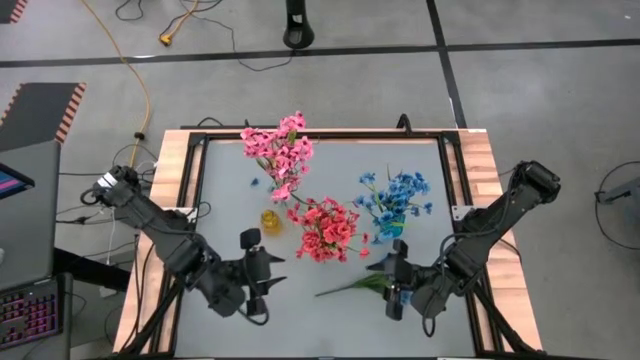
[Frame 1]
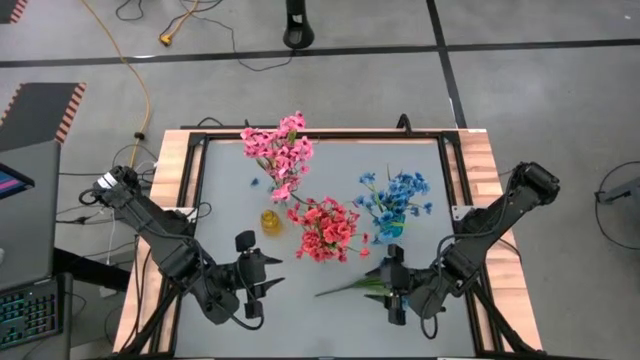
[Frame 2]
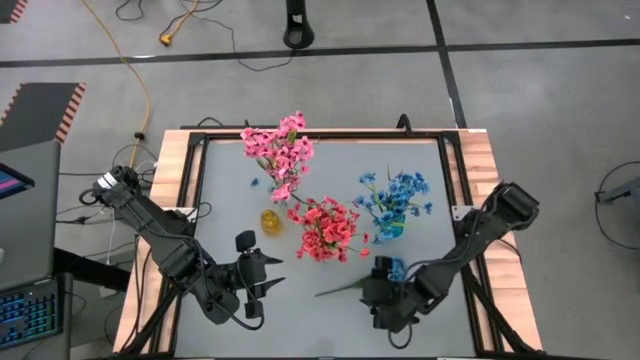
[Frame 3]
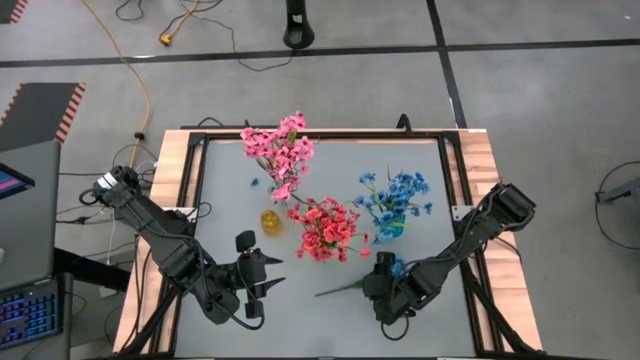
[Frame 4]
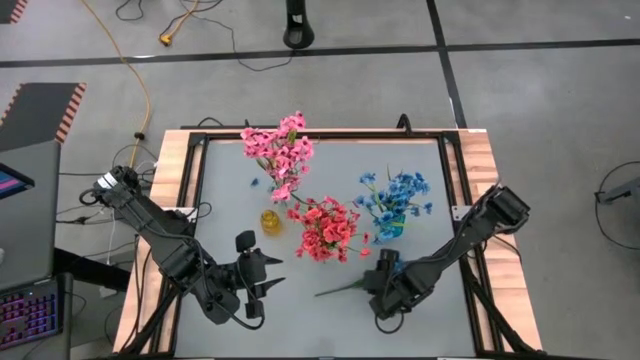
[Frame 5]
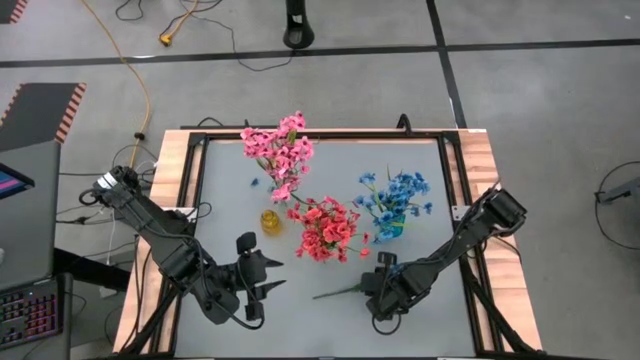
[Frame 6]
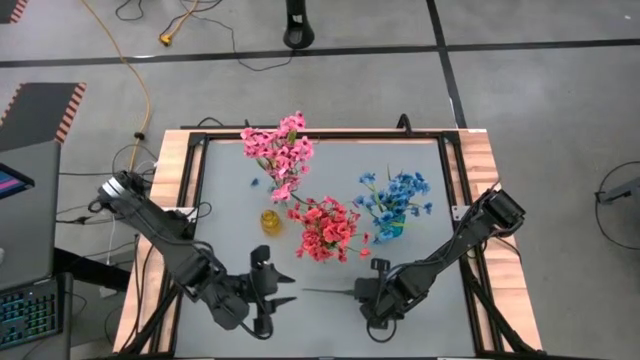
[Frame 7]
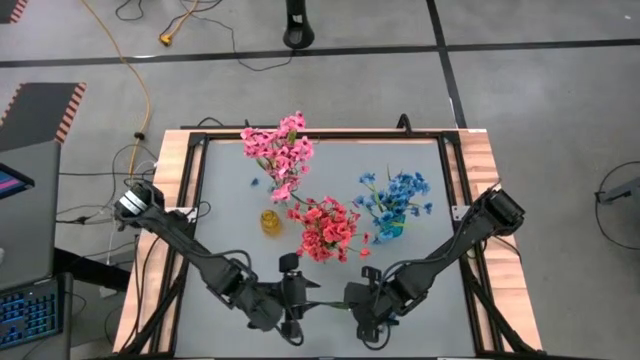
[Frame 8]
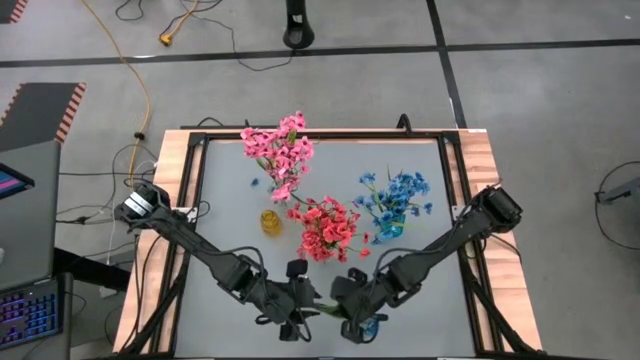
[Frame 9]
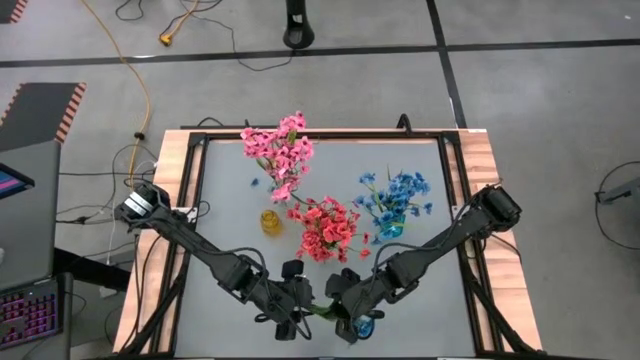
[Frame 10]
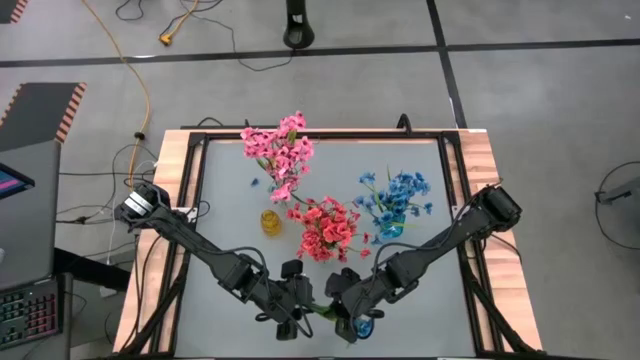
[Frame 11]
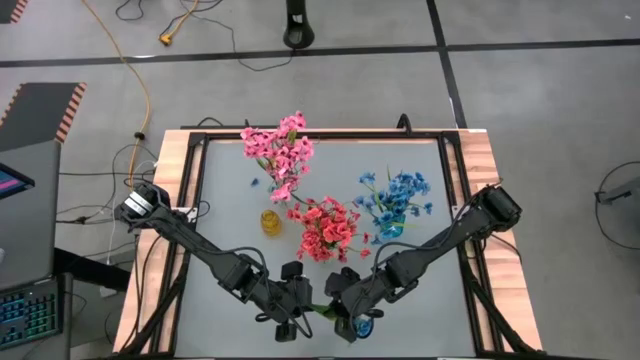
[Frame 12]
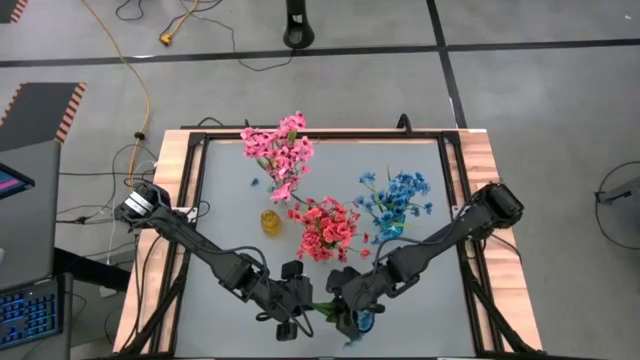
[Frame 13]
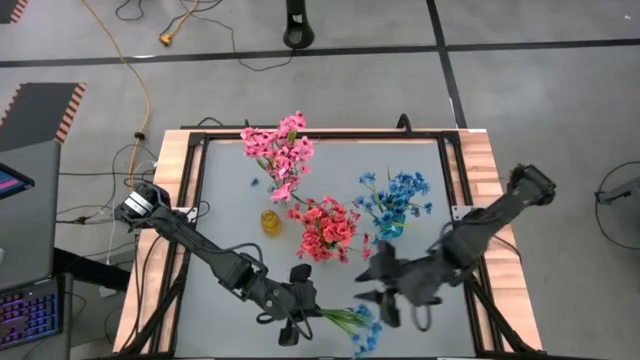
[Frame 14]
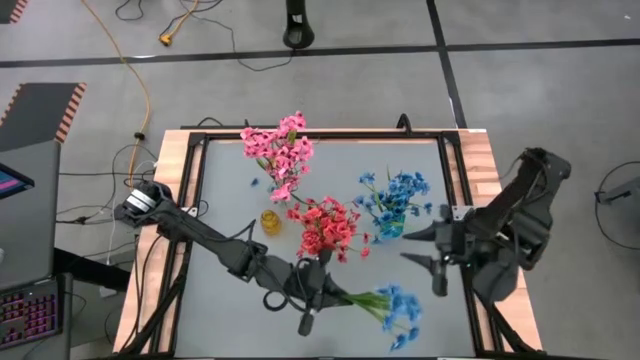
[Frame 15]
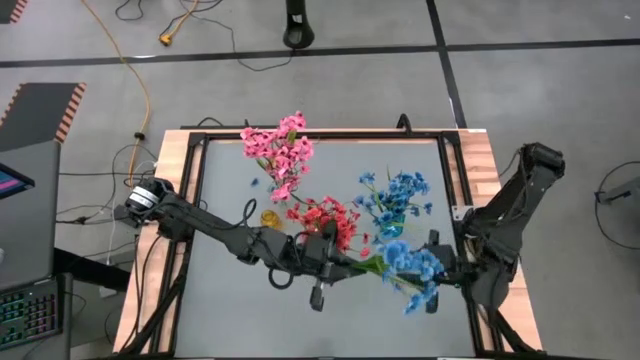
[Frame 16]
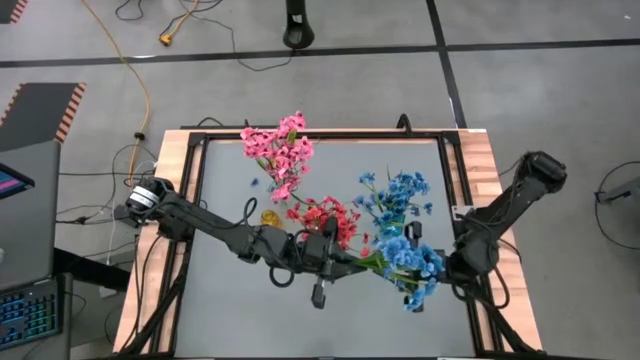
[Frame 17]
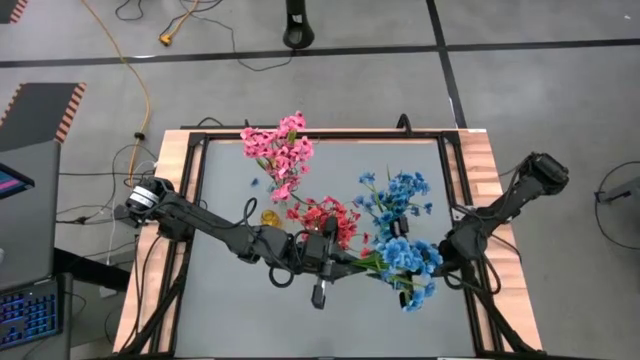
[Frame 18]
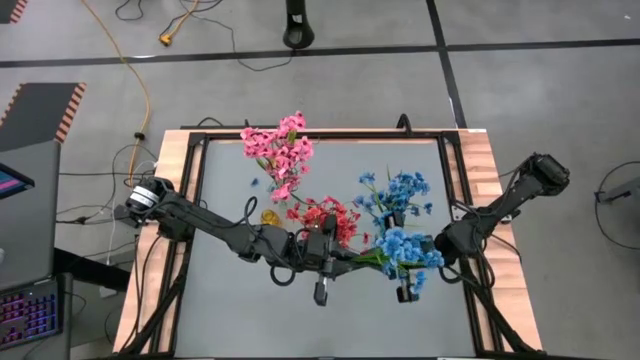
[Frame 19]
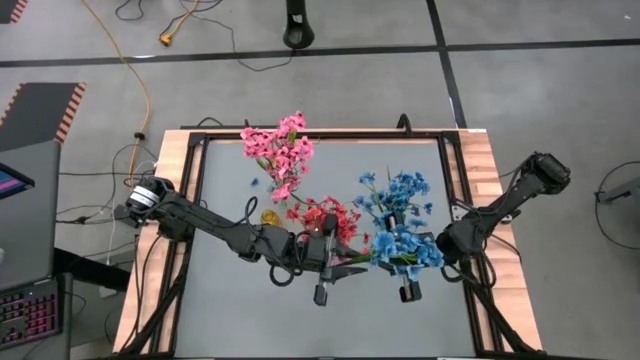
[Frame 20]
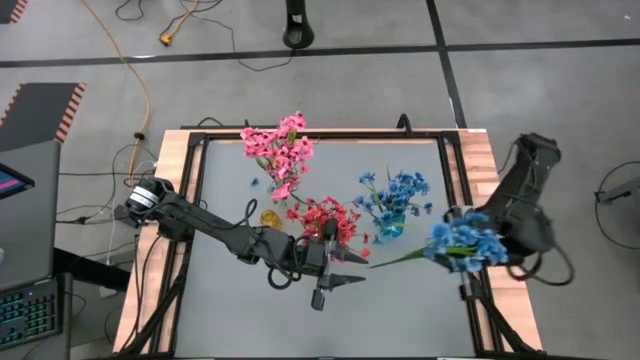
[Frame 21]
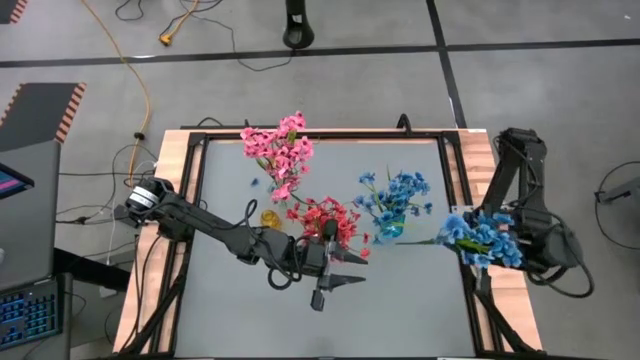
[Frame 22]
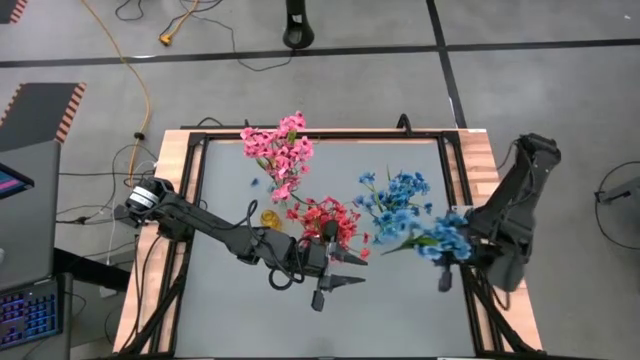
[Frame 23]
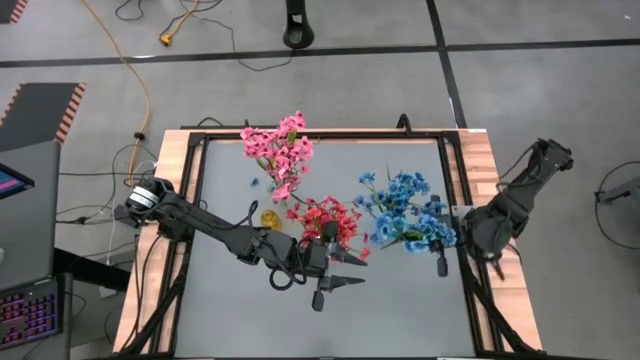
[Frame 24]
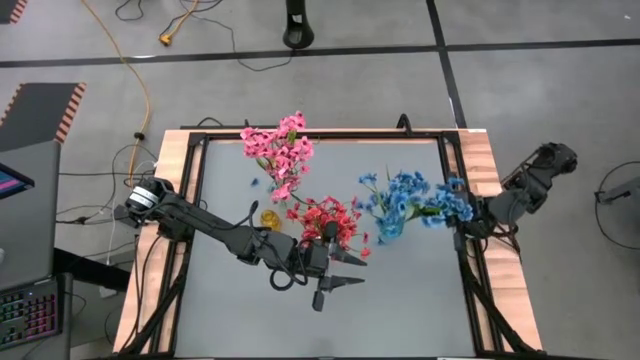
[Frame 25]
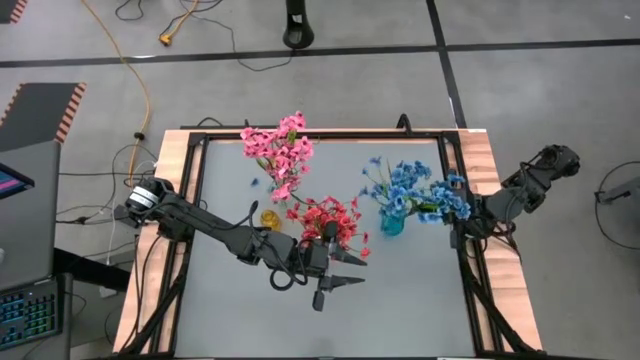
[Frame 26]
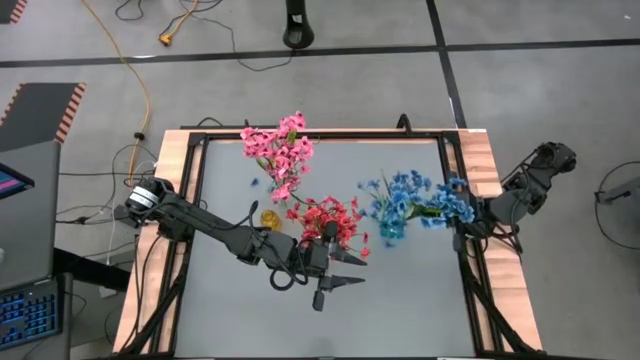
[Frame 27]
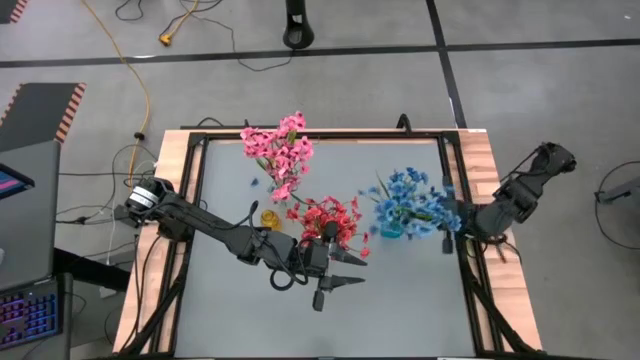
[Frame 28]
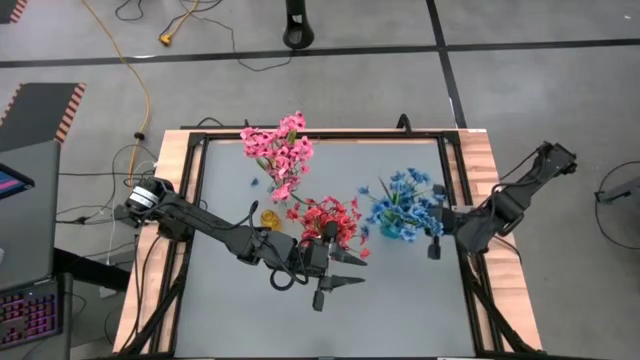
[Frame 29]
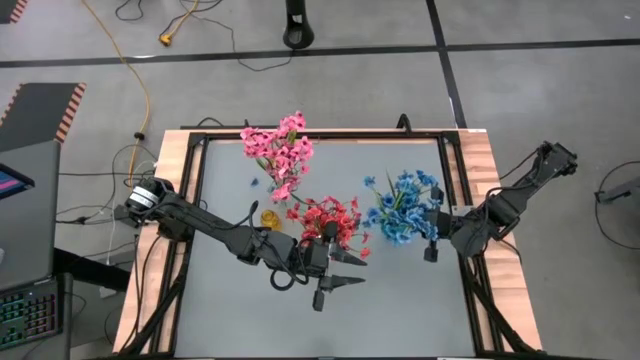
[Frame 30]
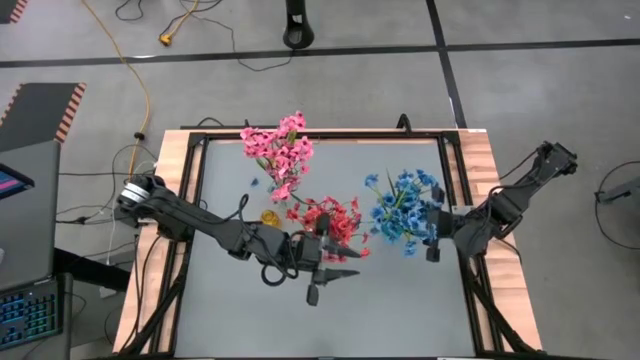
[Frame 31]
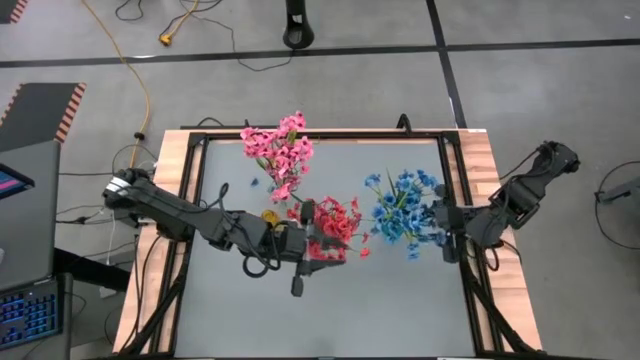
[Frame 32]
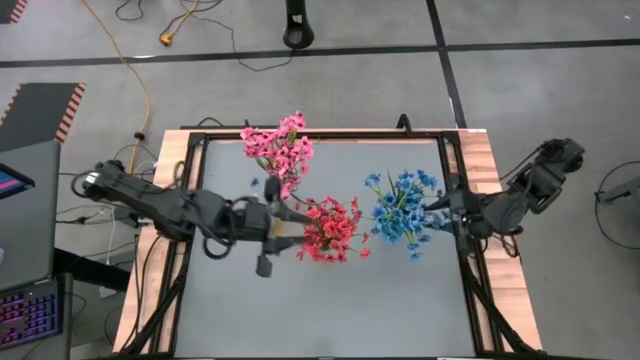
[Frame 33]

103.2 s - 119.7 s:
Task: Sort flowers into vase by color
Put the blue flowers into the blue vase

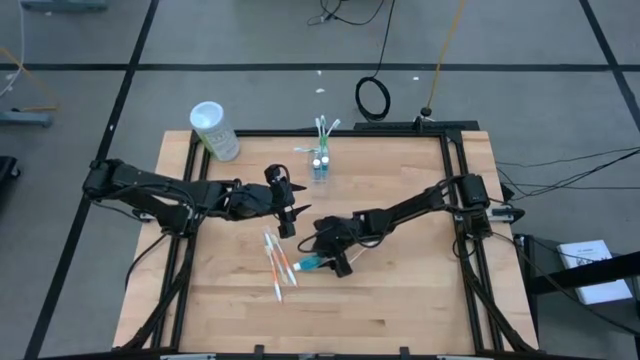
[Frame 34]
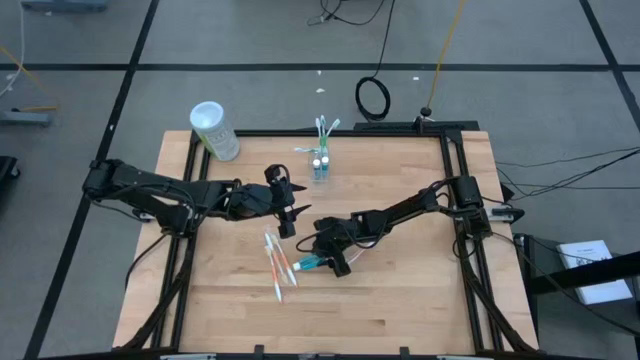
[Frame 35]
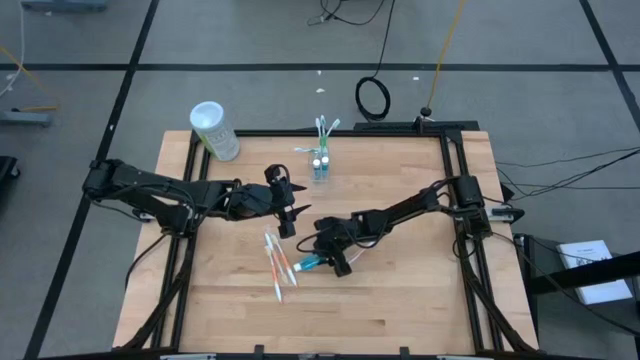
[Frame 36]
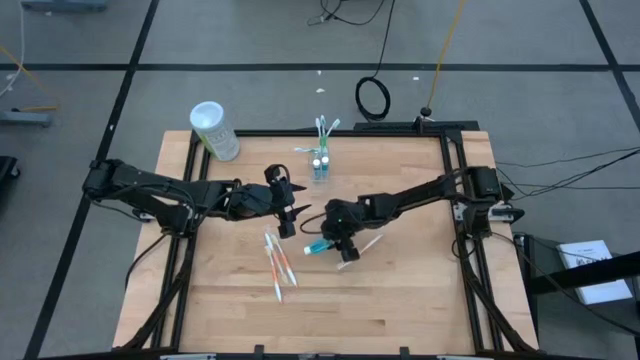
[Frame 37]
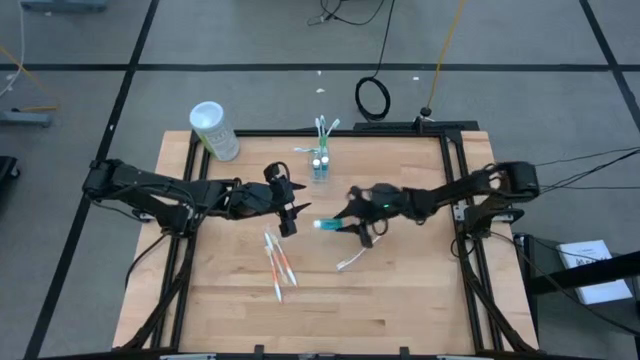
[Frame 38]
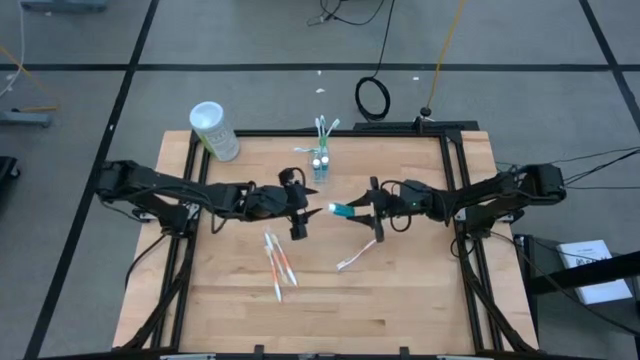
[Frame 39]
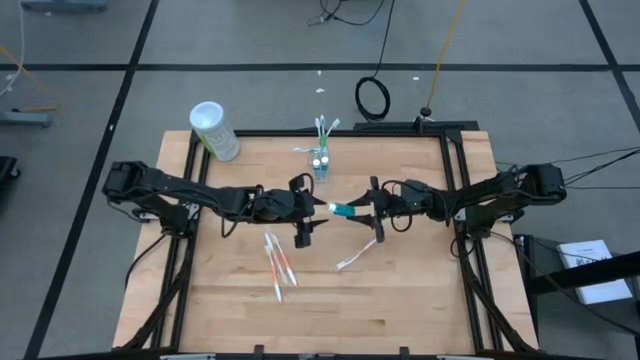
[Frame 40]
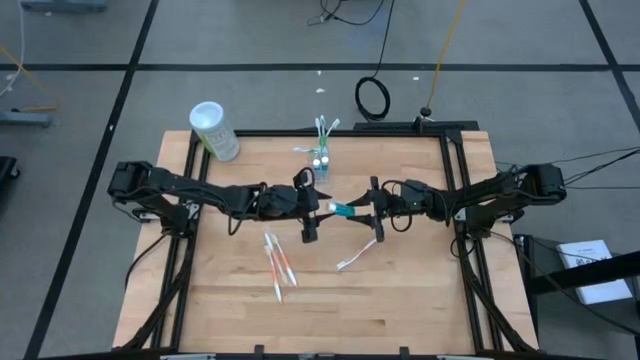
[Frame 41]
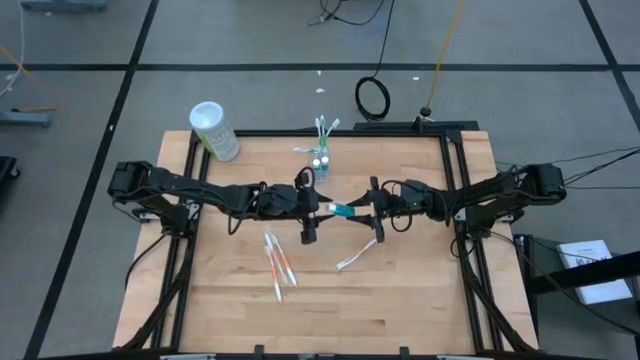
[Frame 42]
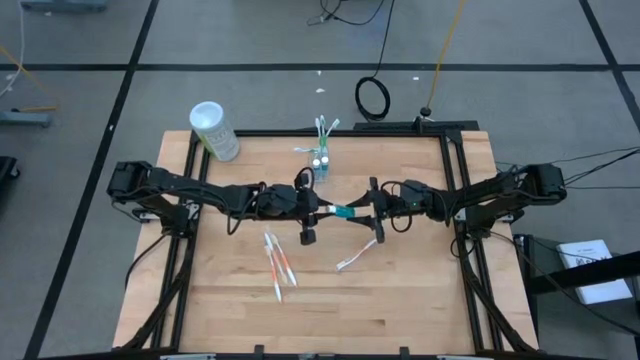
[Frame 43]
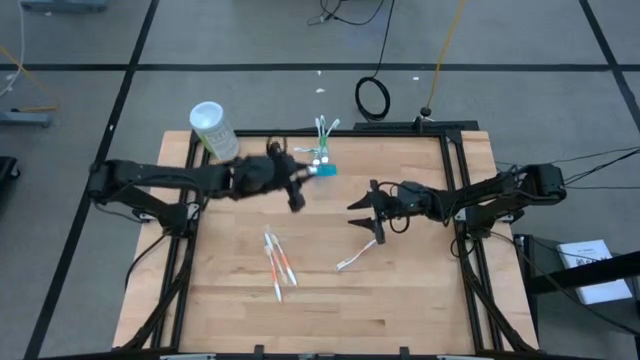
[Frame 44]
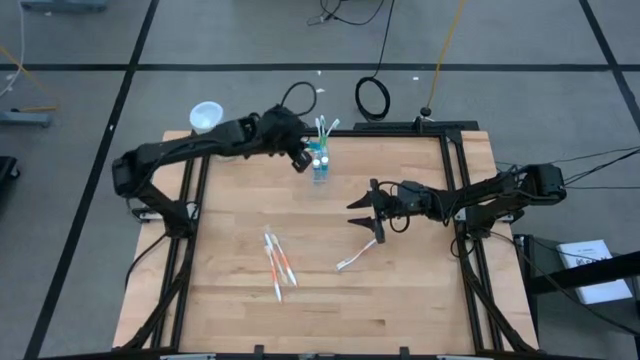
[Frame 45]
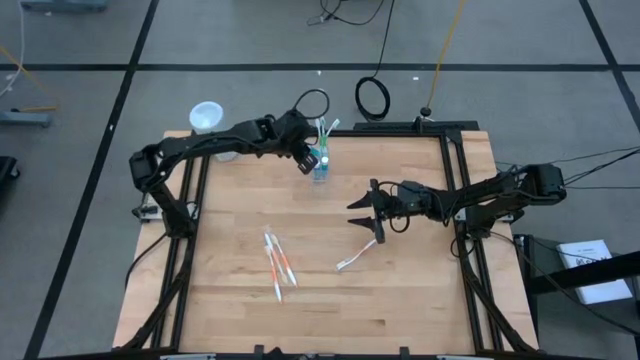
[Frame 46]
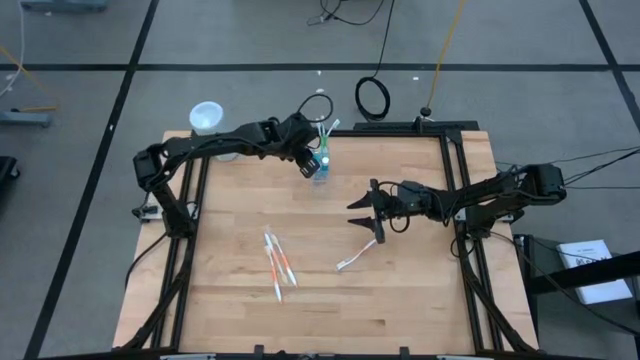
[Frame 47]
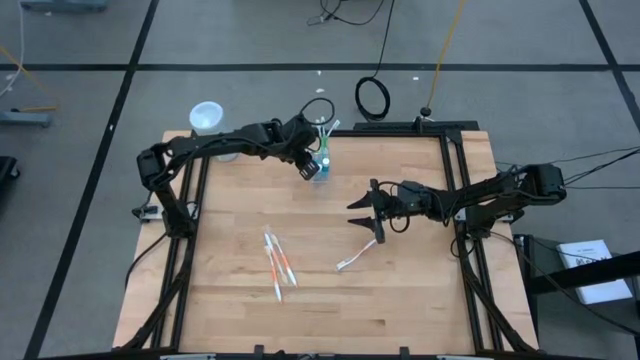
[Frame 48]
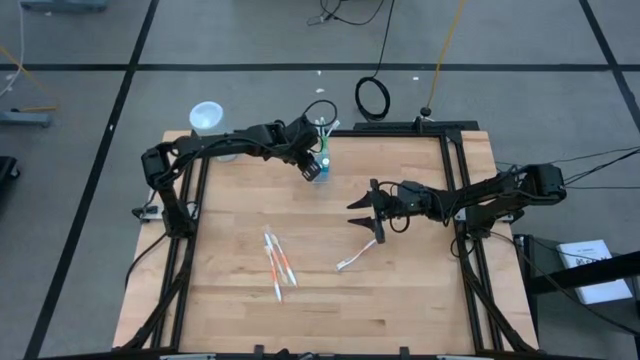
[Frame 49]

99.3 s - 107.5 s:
Task: Pick & Place toothbrushing station
Put the blue mouthwash bottle into the transparent organizer
